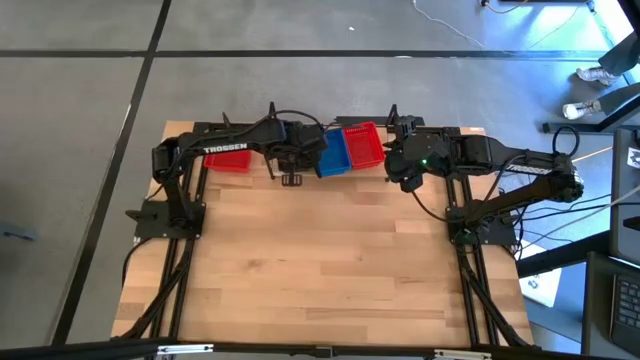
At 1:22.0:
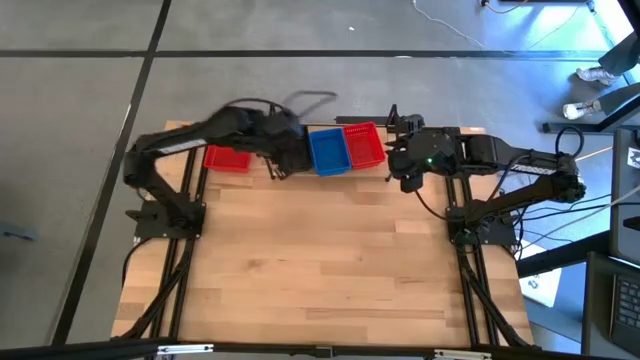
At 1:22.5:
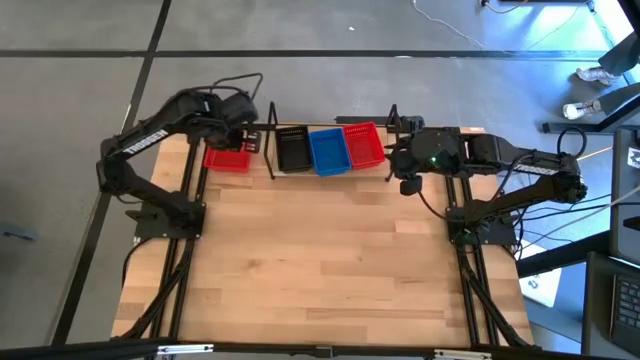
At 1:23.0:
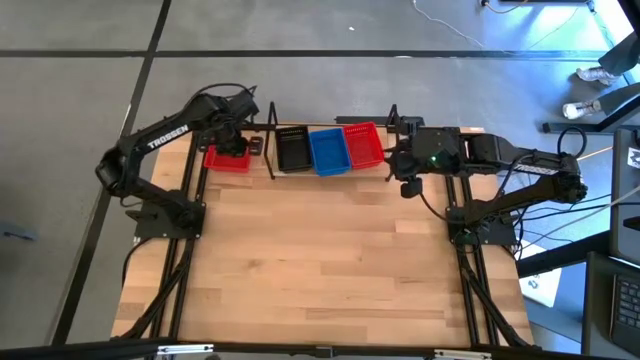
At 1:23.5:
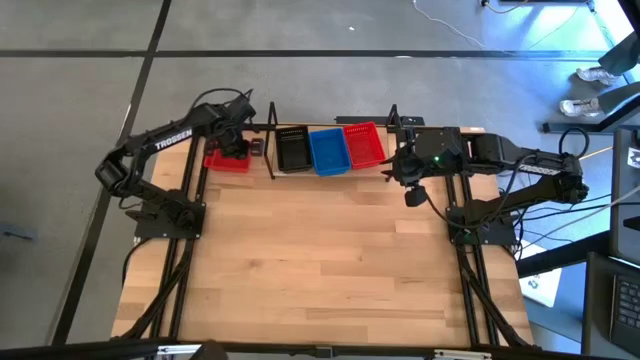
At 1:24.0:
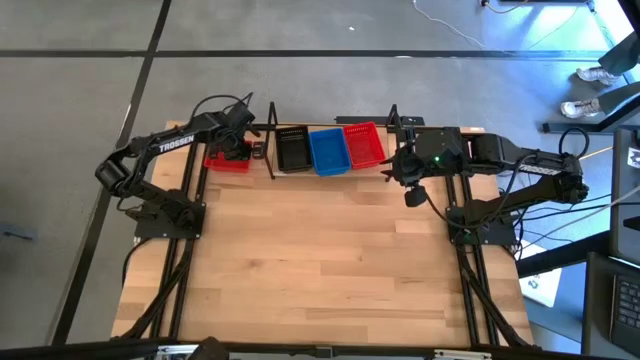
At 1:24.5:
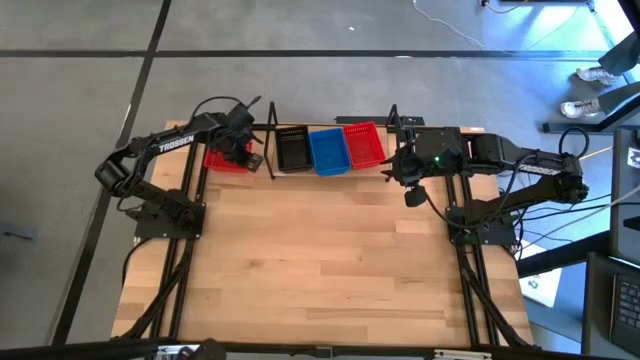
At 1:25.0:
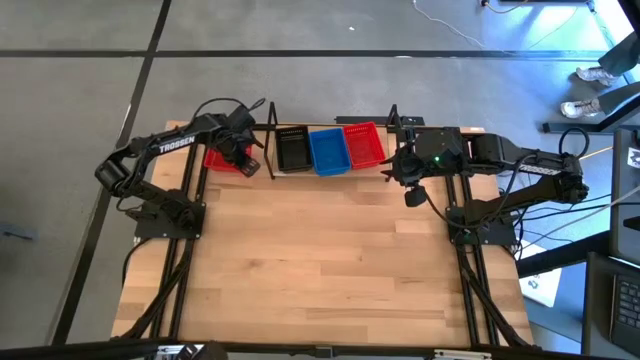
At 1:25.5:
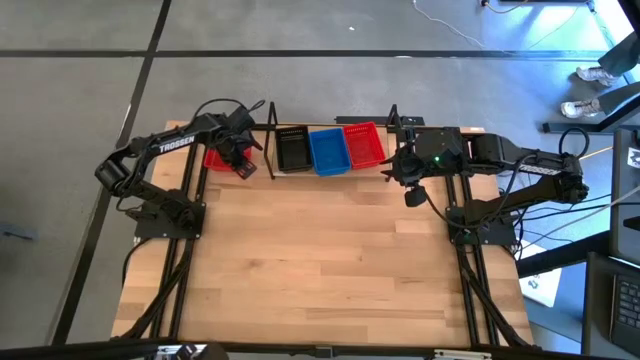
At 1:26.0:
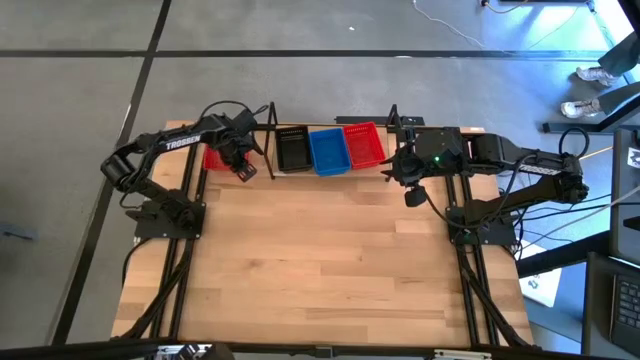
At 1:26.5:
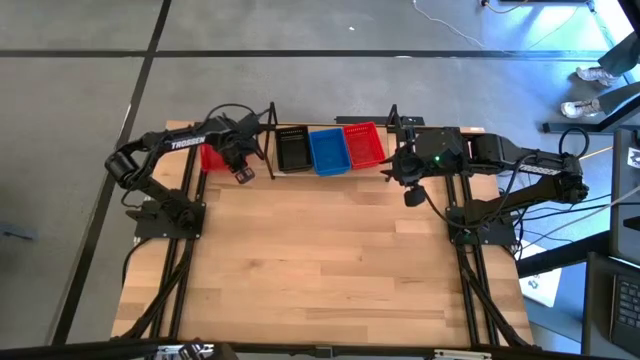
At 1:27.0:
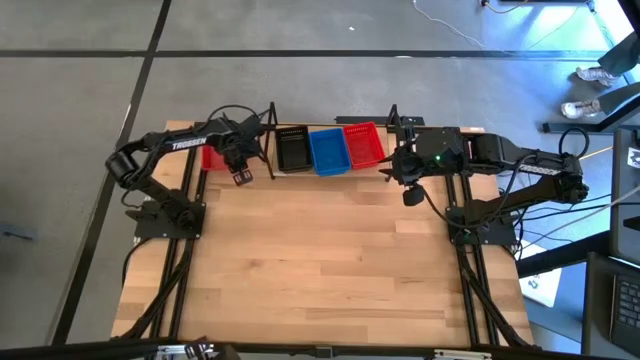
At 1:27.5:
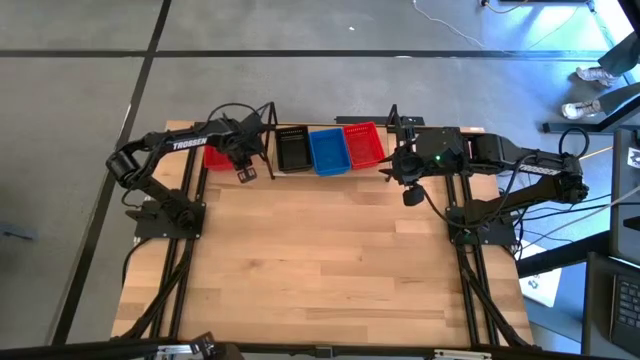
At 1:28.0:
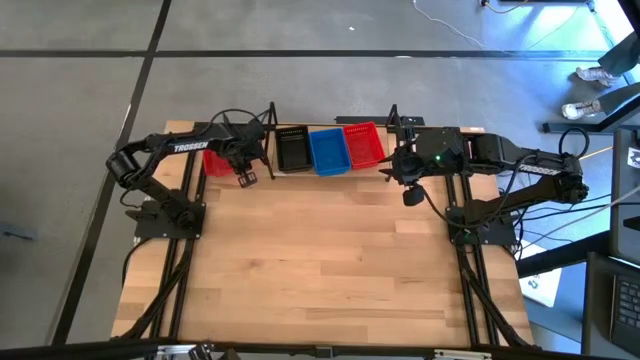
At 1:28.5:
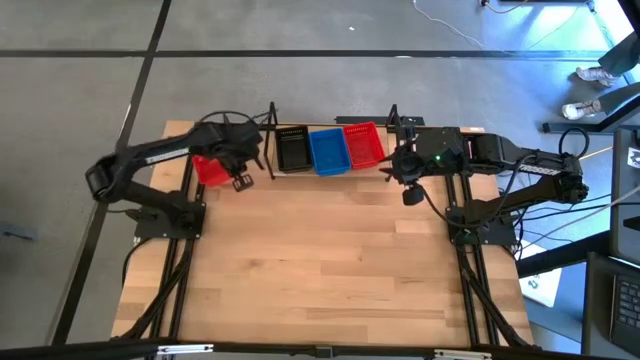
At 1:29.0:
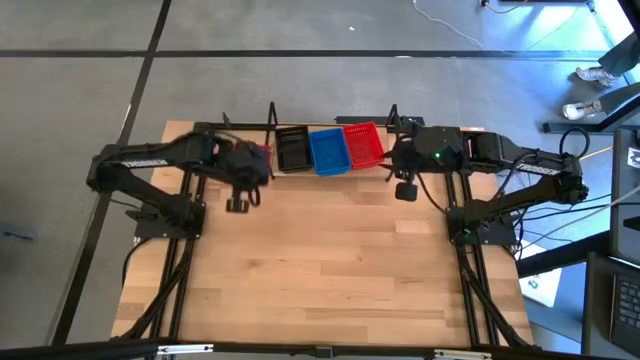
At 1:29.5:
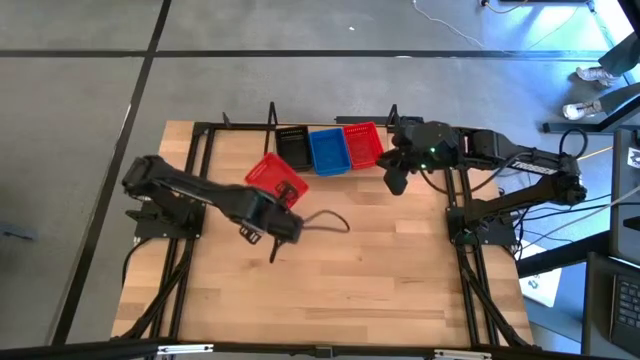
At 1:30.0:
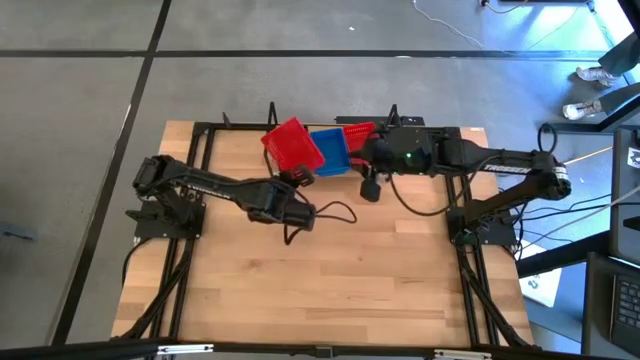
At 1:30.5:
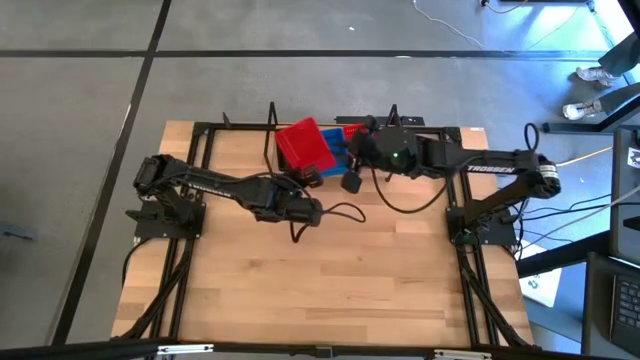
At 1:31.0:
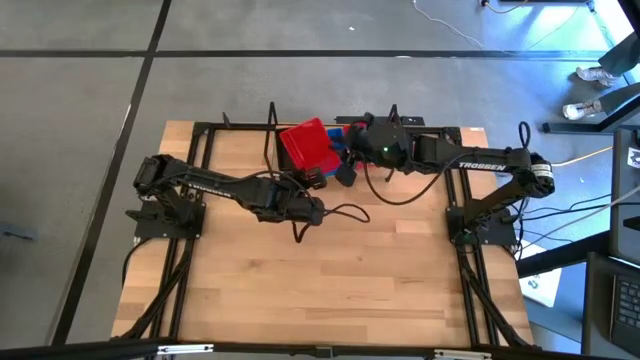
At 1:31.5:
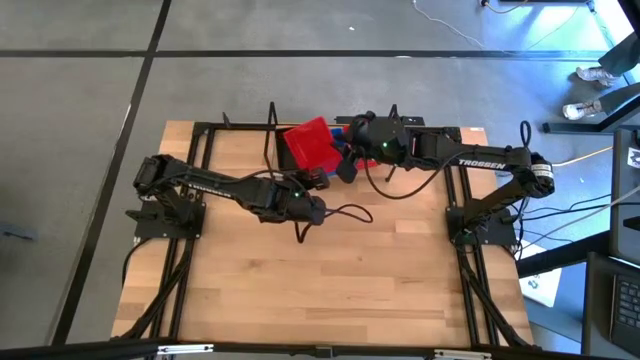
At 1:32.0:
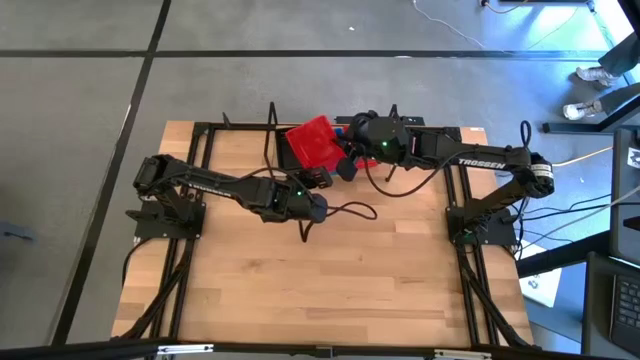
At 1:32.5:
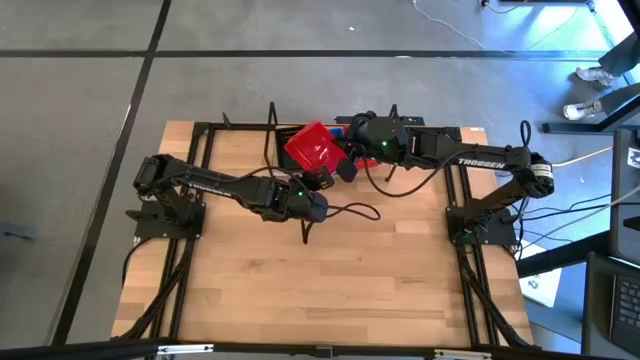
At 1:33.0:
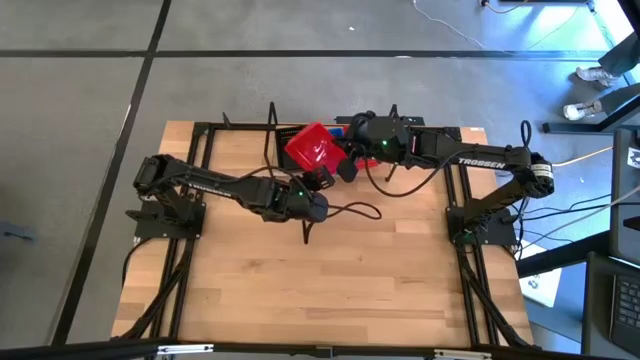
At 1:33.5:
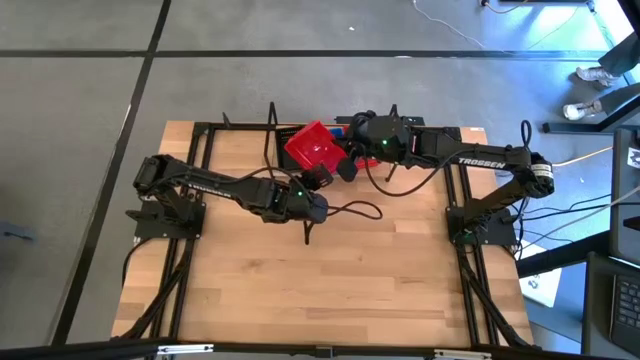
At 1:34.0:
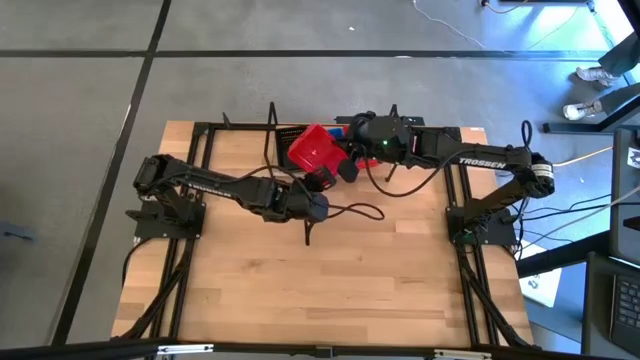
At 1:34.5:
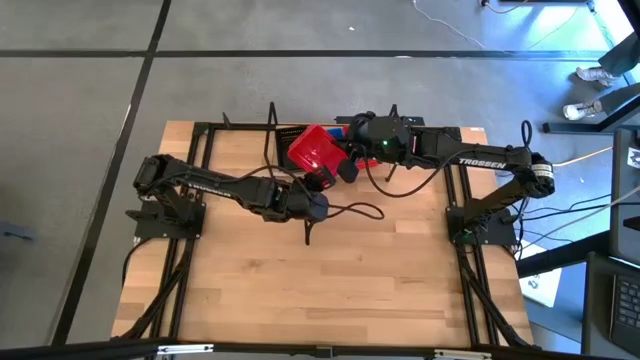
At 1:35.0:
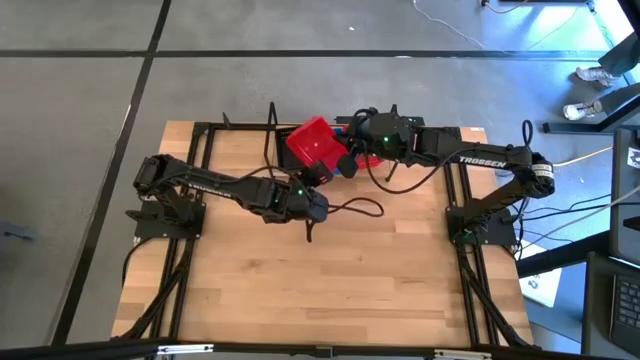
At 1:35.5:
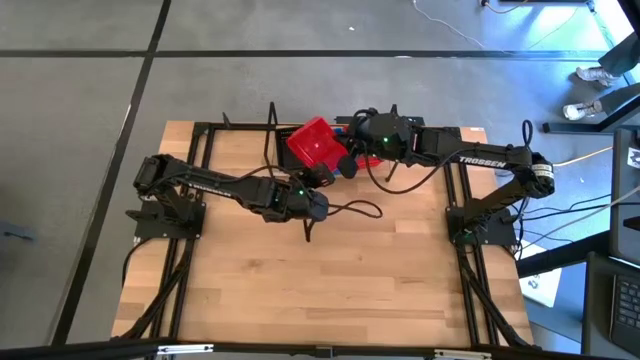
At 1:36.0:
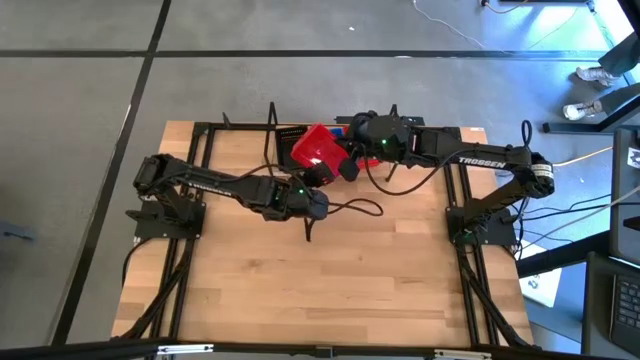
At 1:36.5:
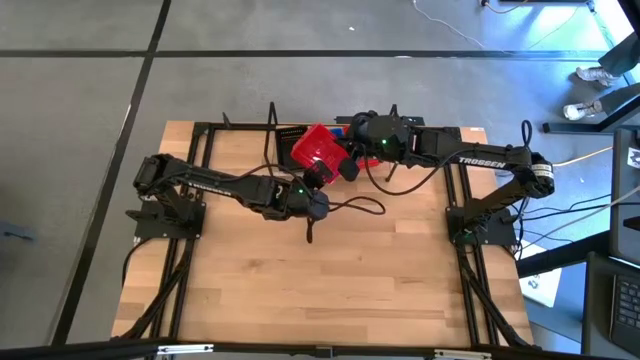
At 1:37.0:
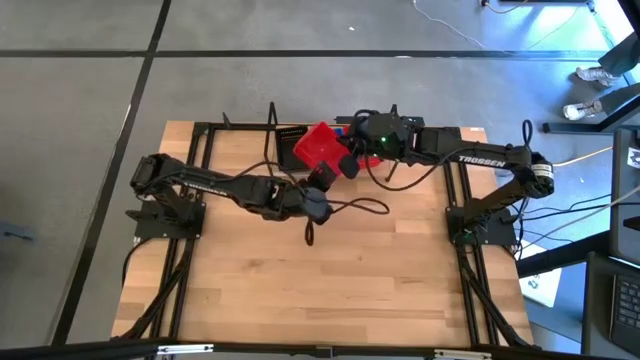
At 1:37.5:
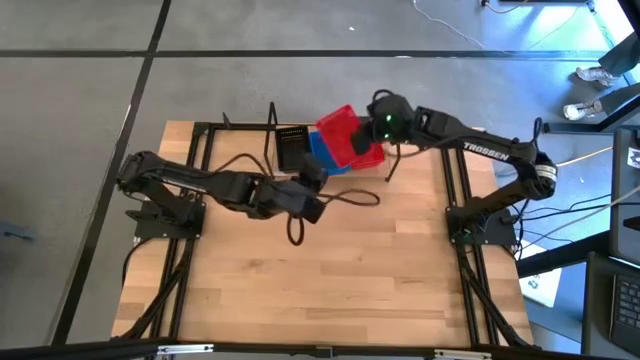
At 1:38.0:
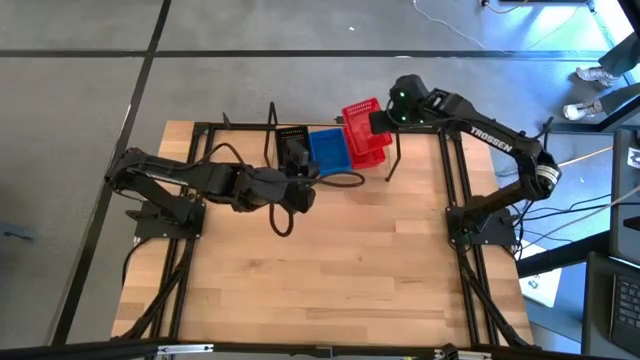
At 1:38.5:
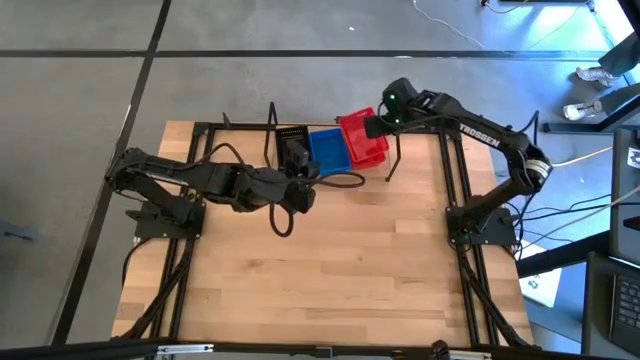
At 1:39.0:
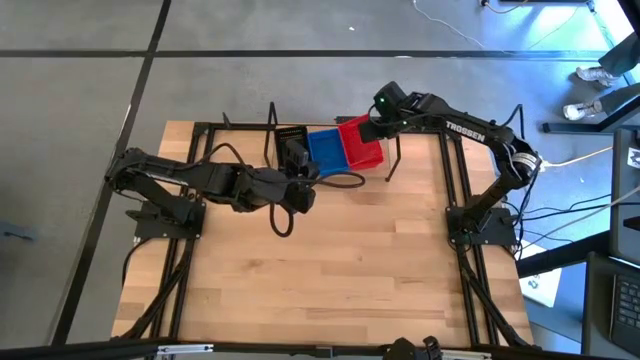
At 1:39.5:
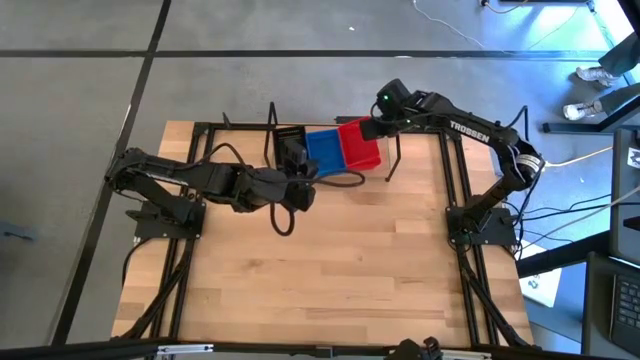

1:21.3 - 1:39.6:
Task: Stack baskets on shelf by color
Stack the red bin on top of the red bin on the shelf
